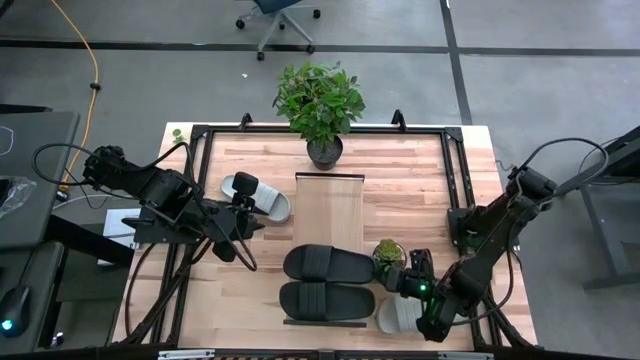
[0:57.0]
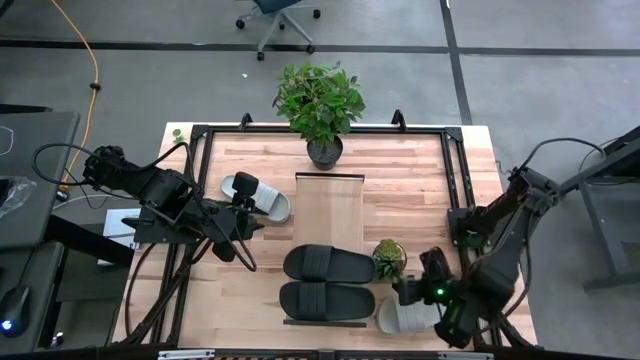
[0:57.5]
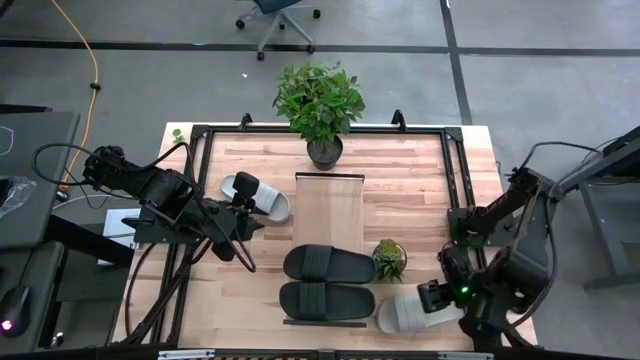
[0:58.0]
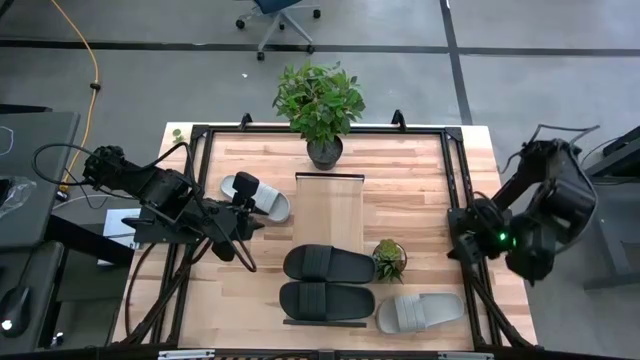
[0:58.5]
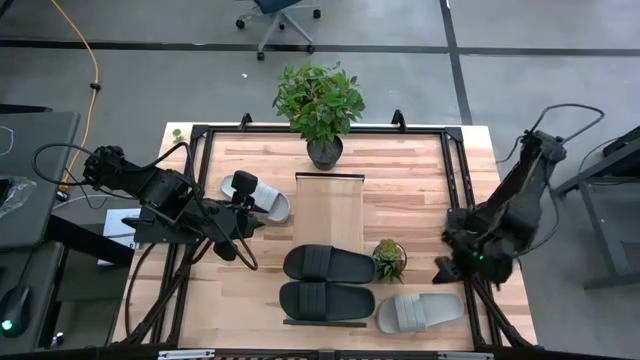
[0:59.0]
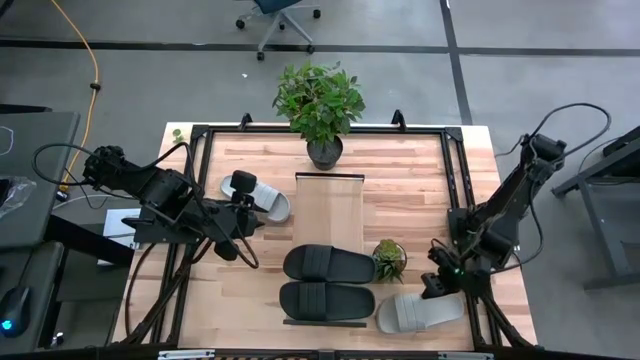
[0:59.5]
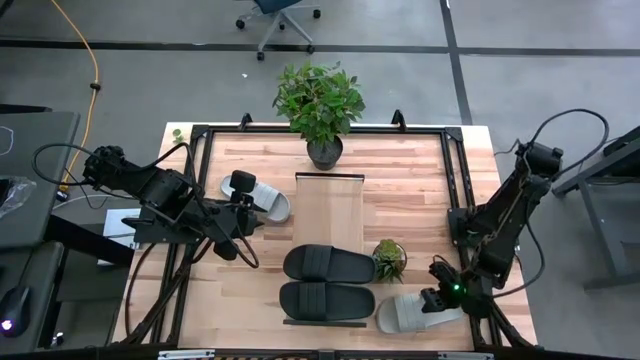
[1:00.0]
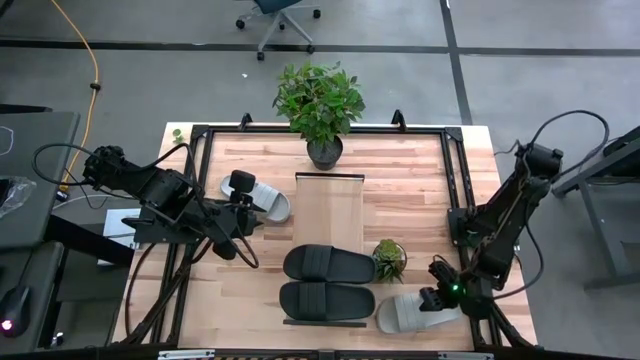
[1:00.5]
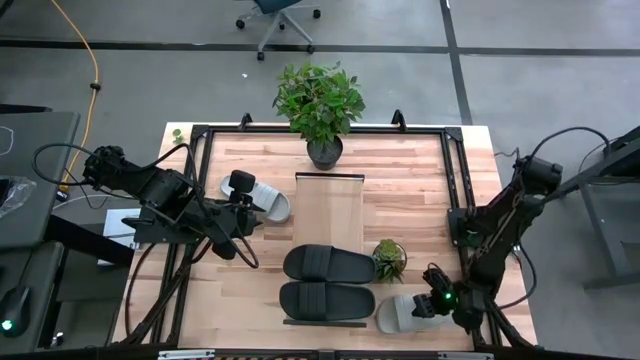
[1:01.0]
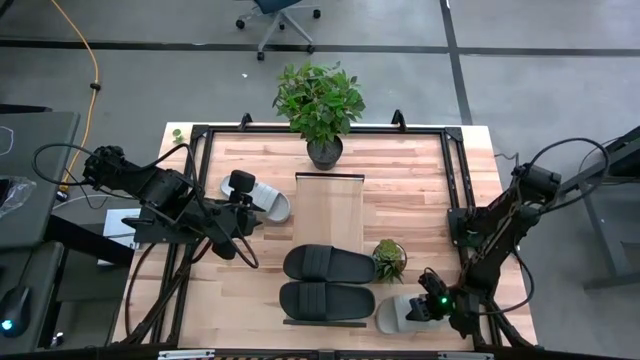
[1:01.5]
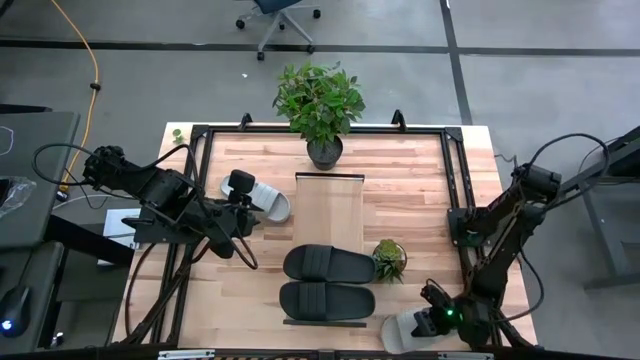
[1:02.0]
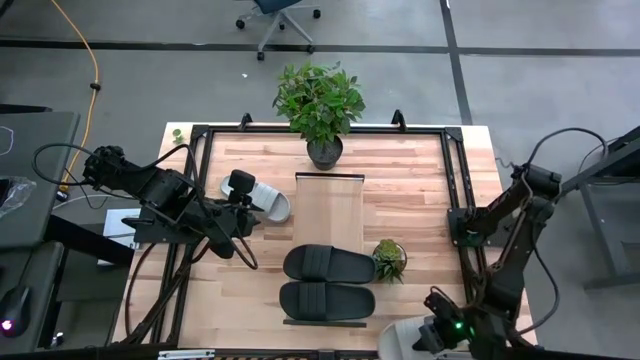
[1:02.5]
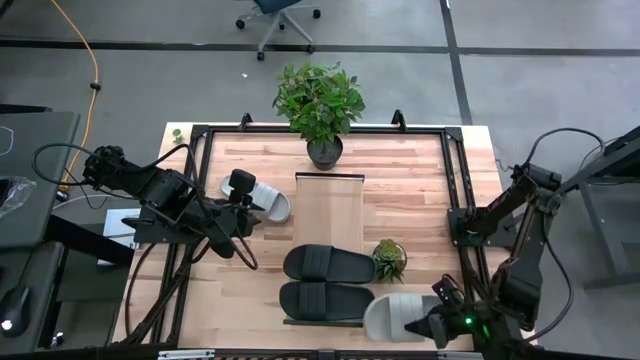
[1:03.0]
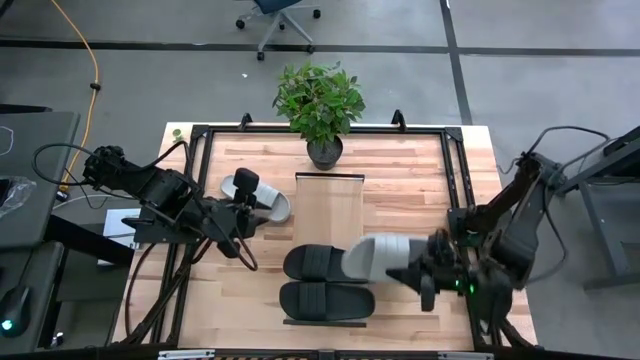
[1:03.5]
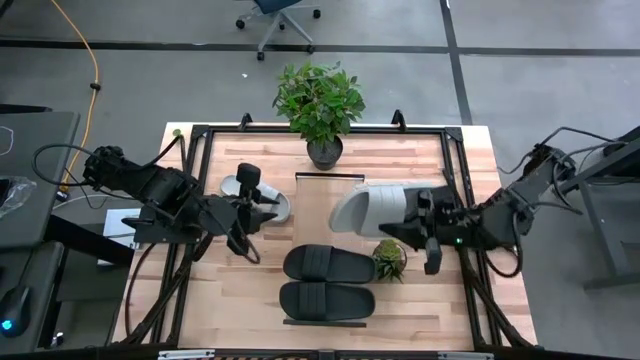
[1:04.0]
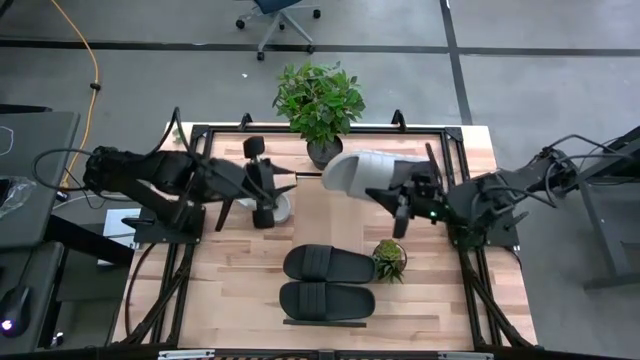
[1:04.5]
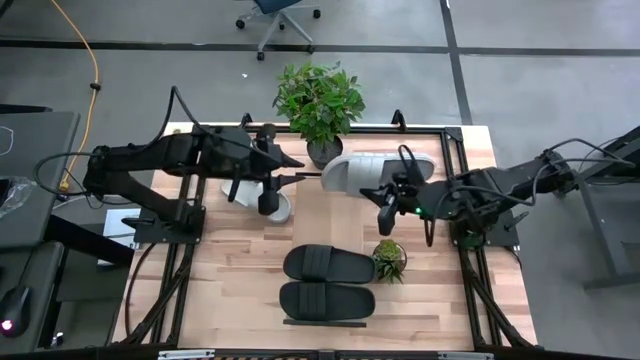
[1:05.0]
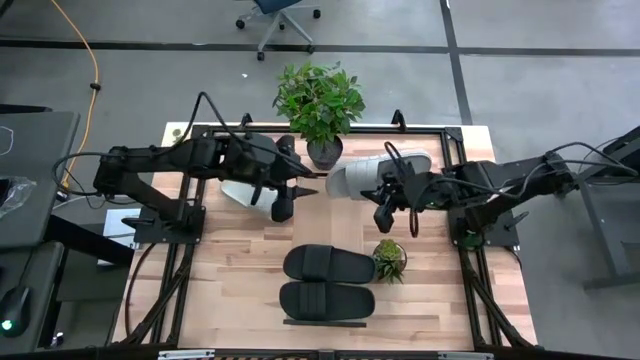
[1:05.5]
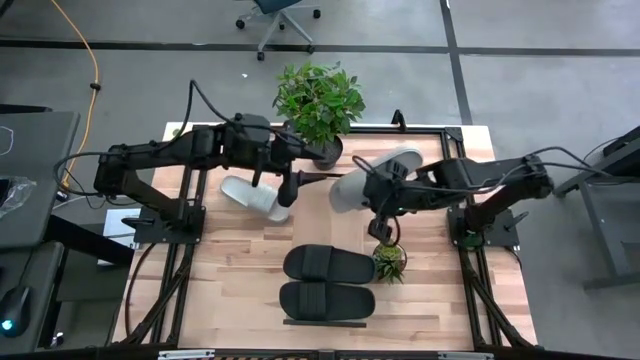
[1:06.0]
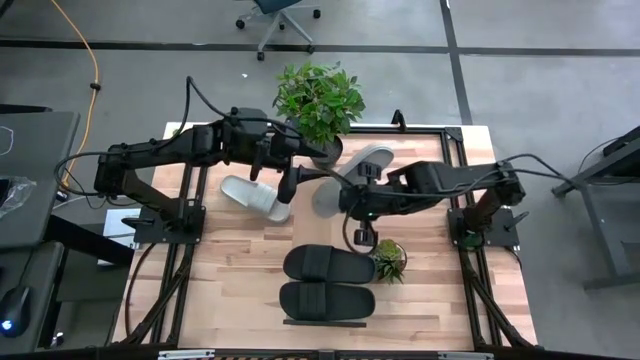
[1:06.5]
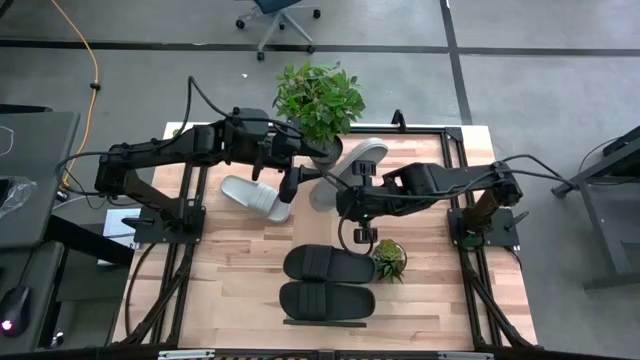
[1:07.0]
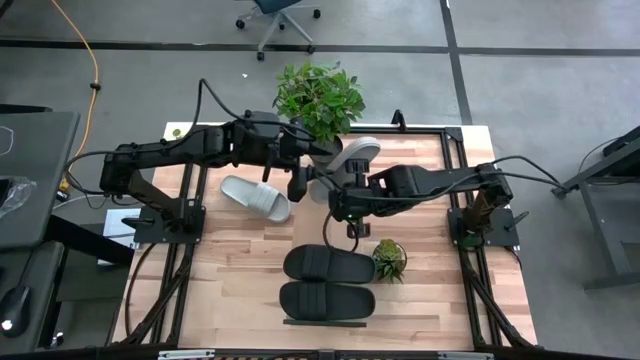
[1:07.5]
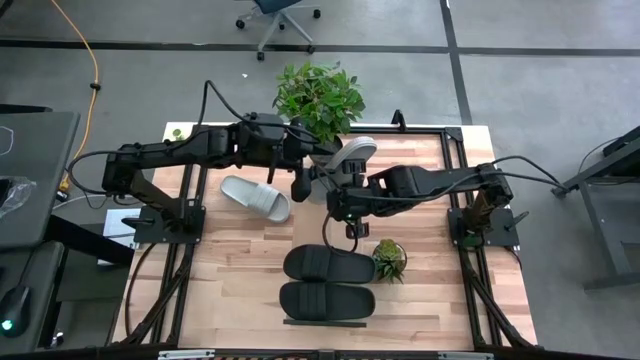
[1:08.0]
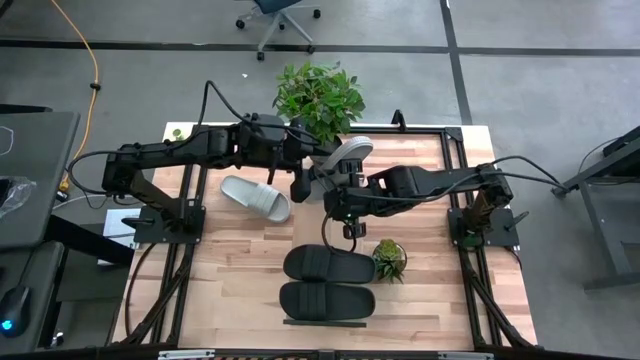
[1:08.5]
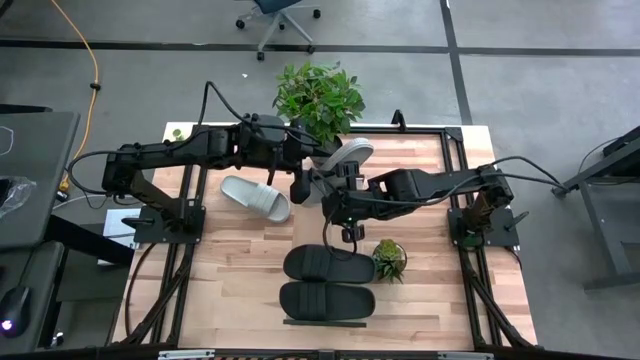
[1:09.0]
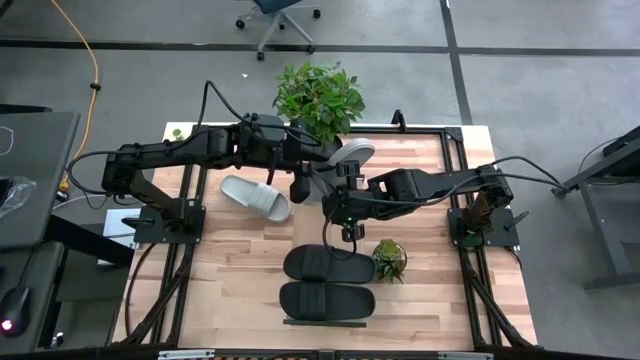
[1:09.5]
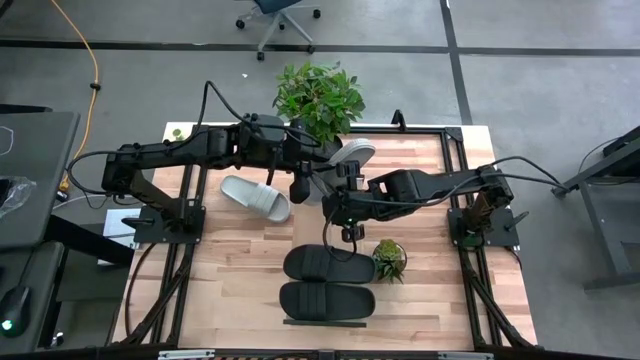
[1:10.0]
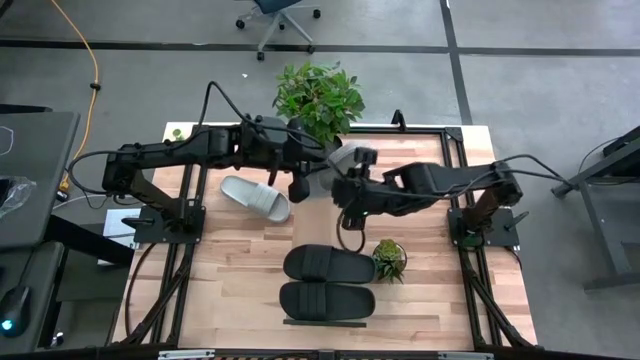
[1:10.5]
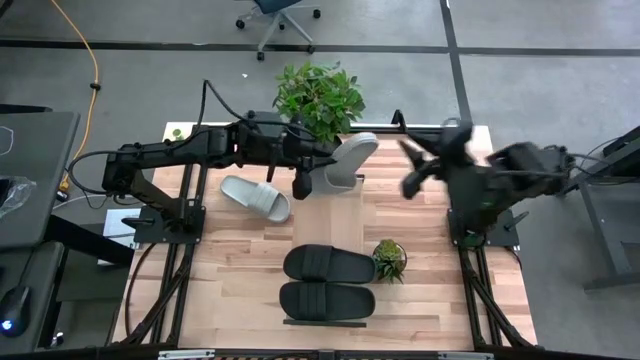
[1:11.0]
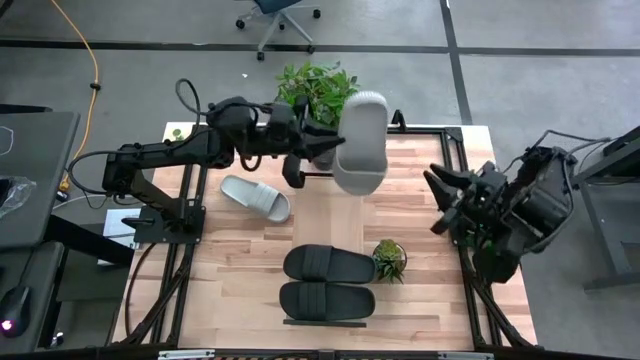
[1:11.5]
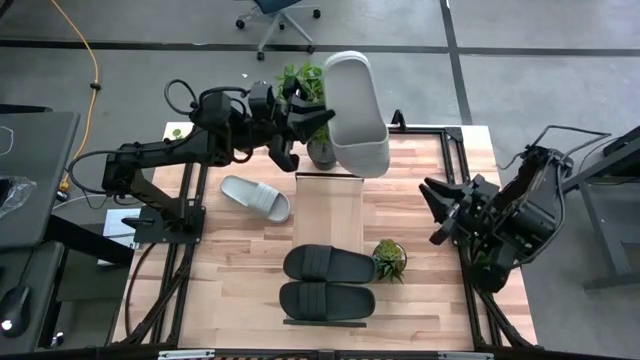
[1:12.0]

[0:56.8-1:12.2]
Task: Pick and place slides into the shelf
Put the bottom gray slide into the shelf

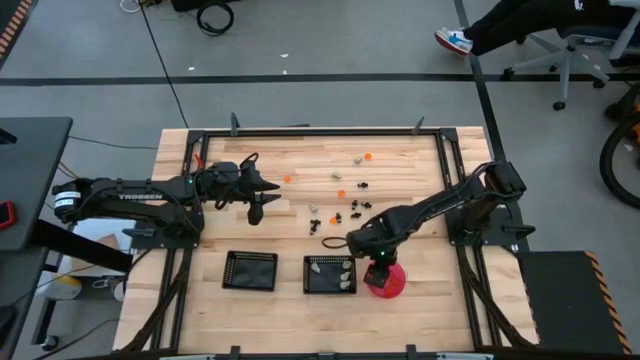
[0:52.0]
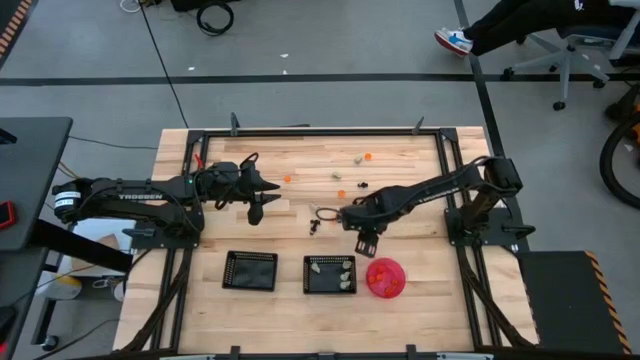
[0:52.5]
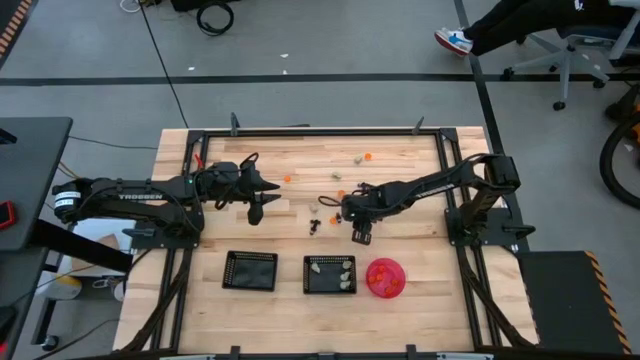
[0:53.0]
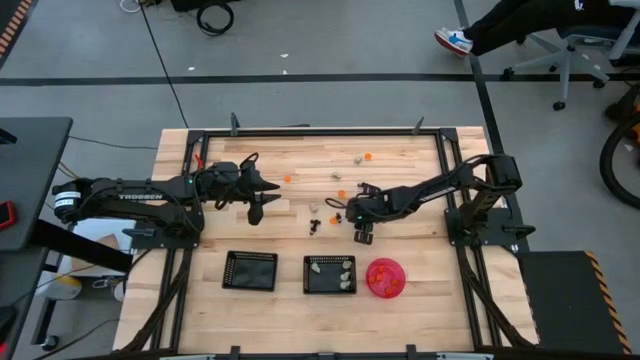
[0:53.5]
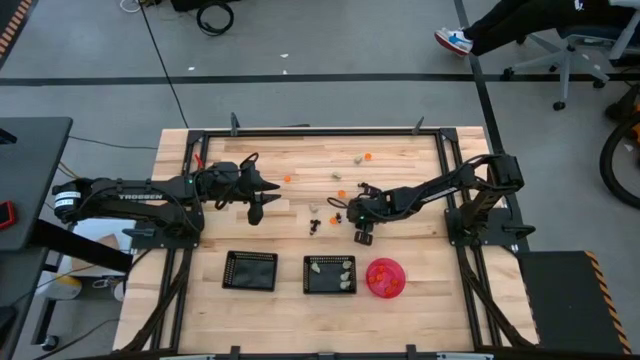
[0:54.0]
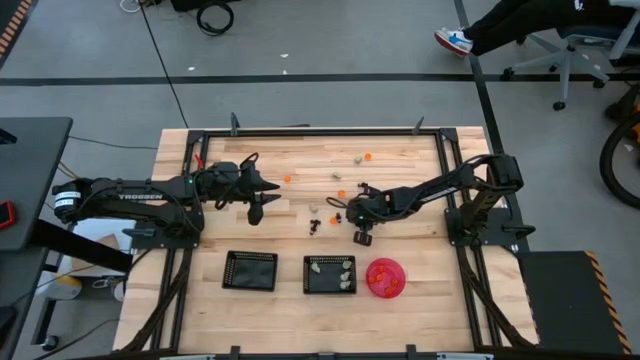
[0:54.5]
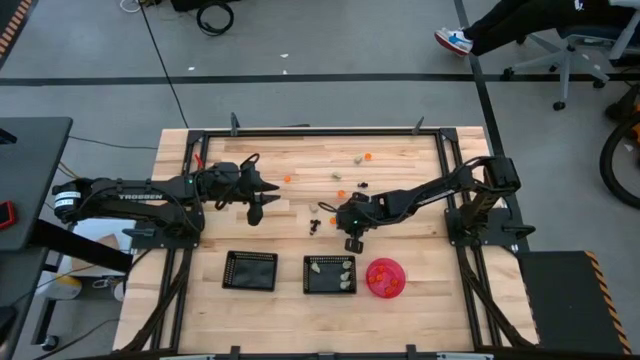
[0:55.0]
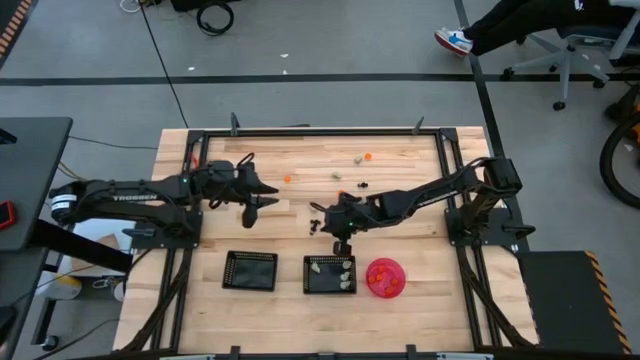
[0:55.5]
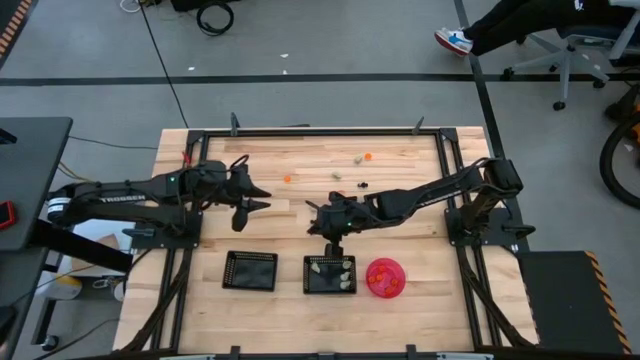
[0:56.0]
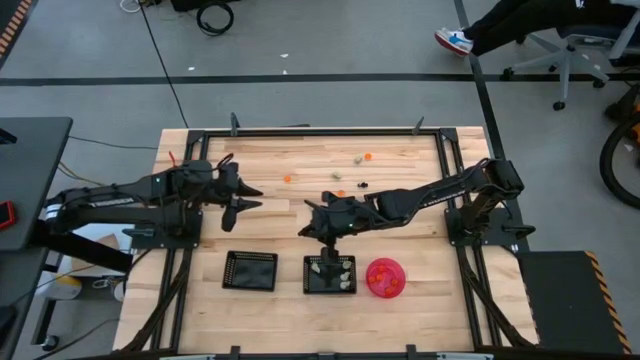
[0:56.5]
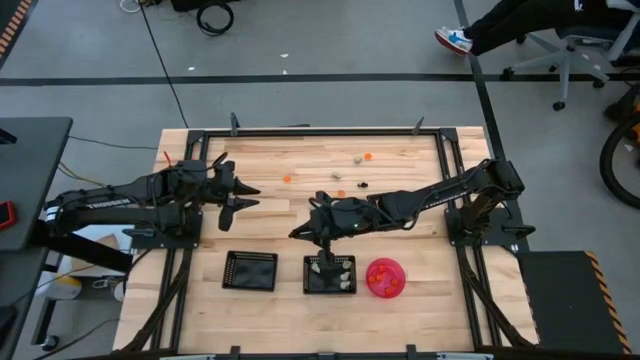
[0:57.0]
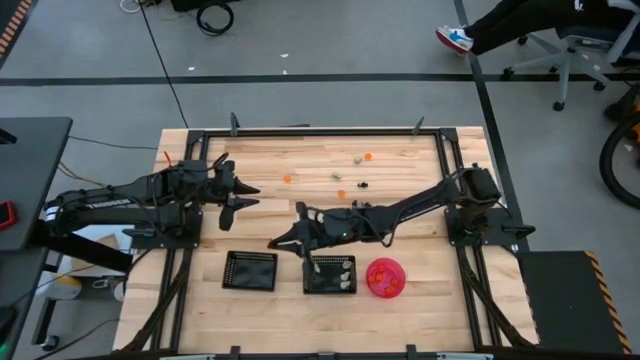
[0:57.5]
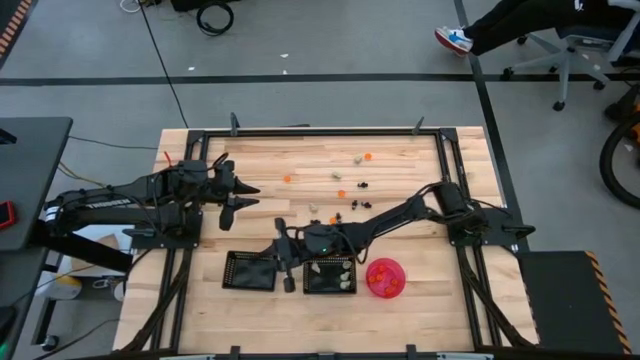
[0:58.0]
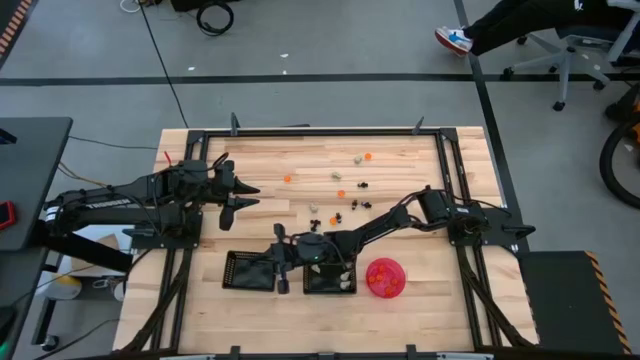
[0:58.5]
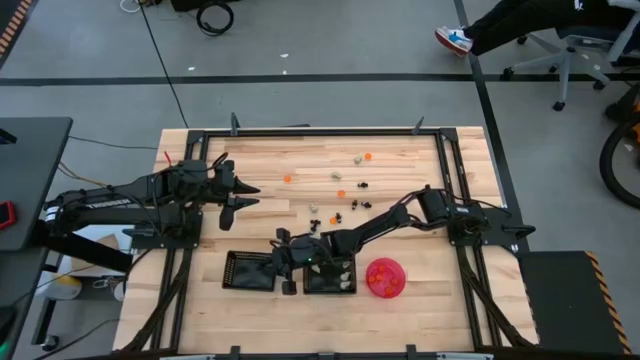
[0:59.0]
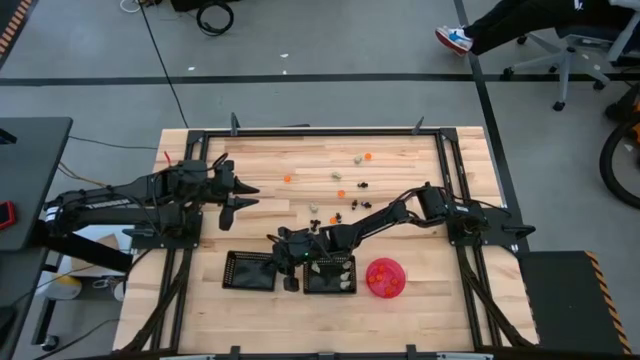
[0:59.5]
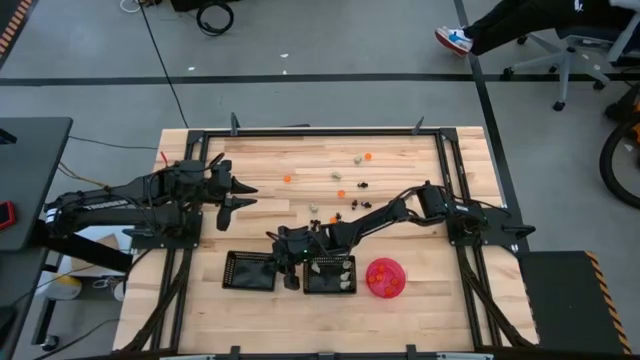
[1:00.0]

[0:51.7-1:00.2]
Task: Sort Halloween decoration
Put the black skeleton toy into the left black bin
